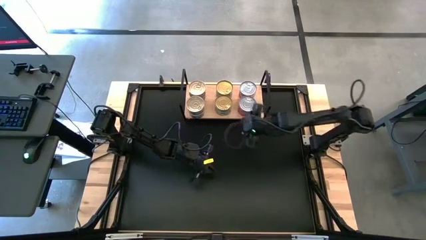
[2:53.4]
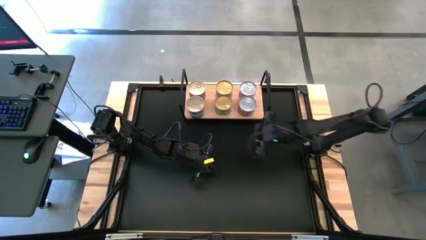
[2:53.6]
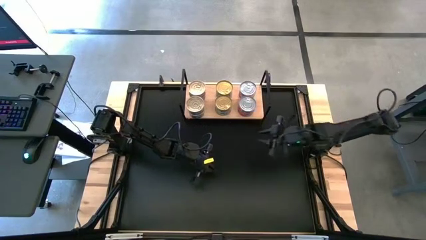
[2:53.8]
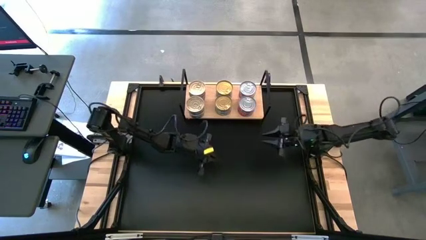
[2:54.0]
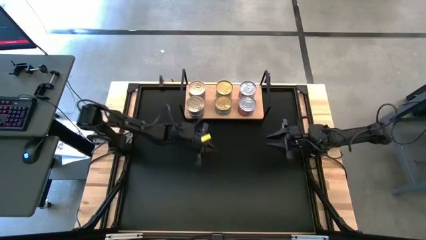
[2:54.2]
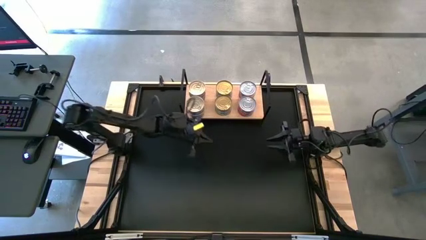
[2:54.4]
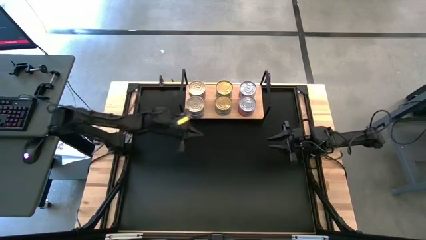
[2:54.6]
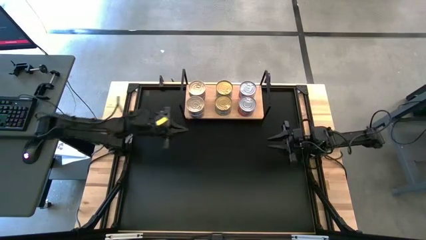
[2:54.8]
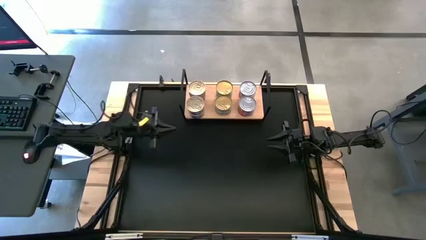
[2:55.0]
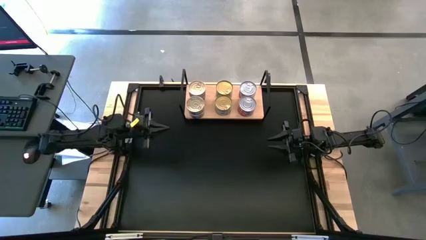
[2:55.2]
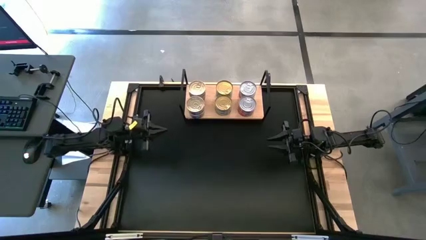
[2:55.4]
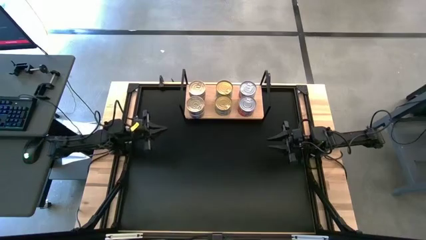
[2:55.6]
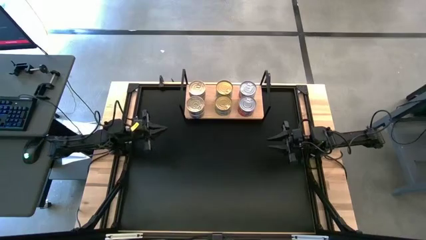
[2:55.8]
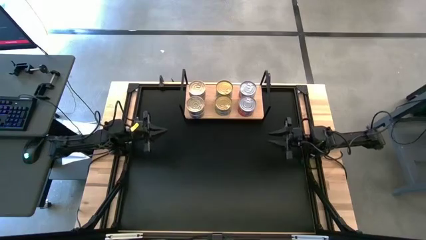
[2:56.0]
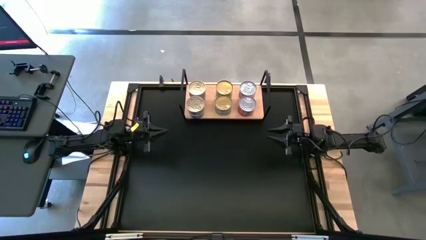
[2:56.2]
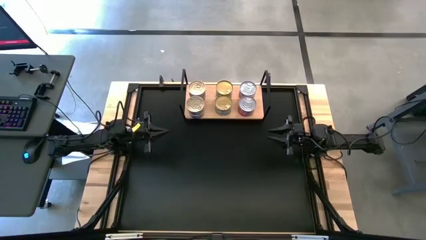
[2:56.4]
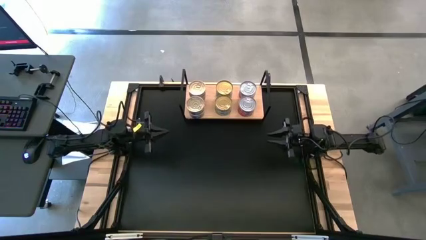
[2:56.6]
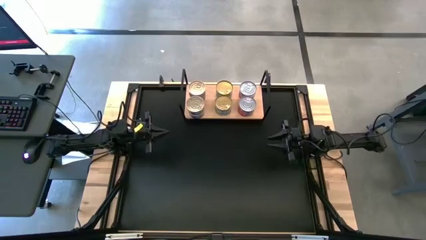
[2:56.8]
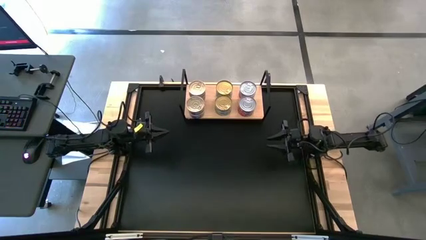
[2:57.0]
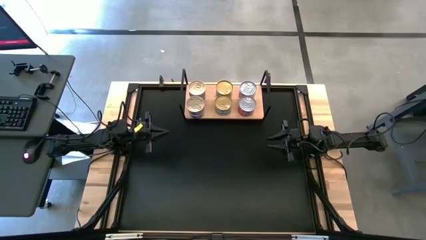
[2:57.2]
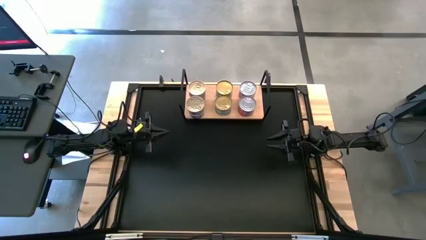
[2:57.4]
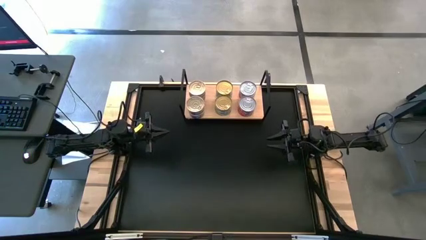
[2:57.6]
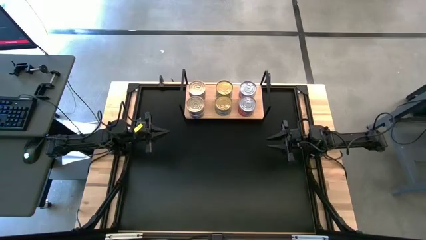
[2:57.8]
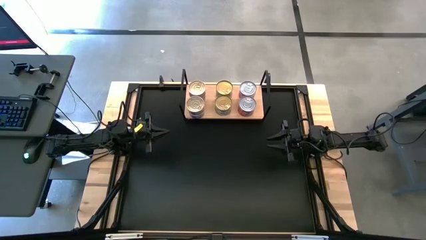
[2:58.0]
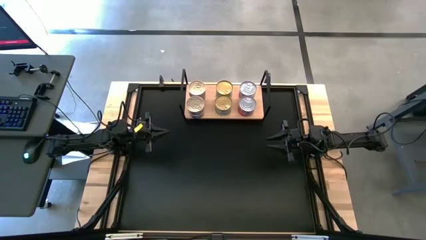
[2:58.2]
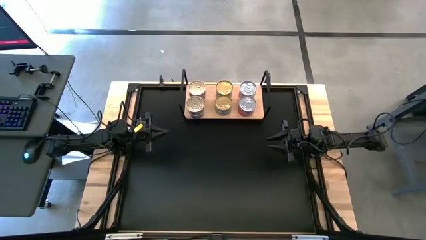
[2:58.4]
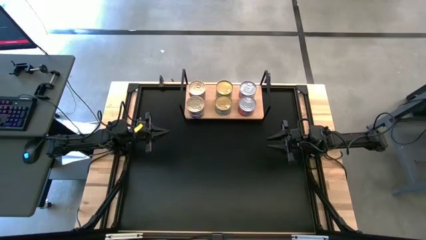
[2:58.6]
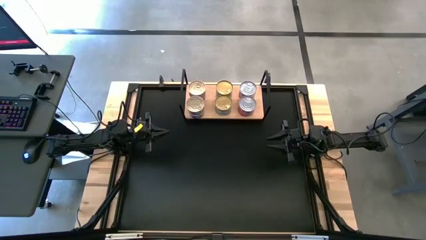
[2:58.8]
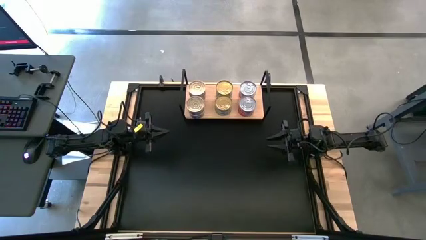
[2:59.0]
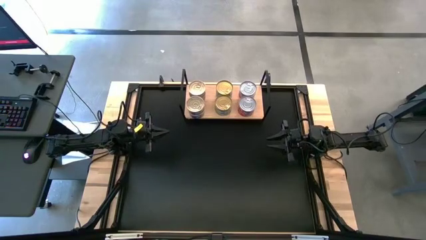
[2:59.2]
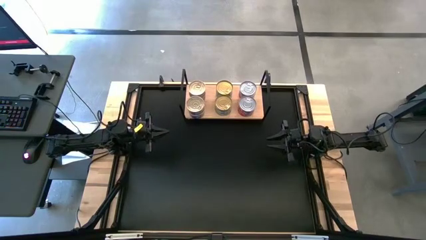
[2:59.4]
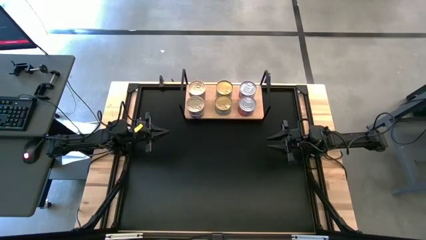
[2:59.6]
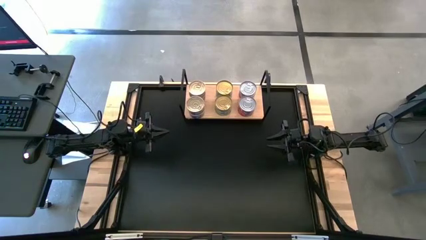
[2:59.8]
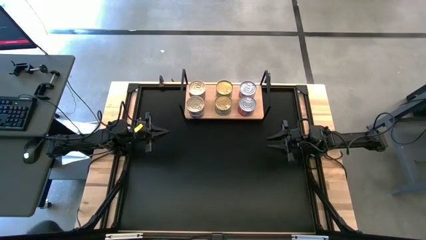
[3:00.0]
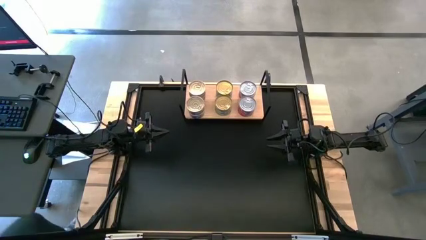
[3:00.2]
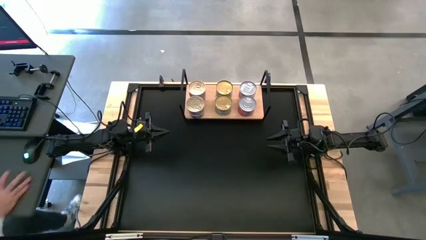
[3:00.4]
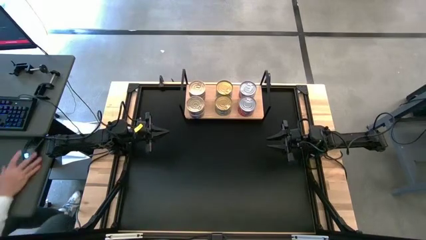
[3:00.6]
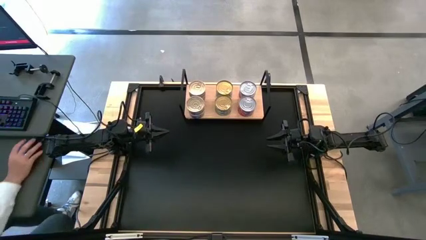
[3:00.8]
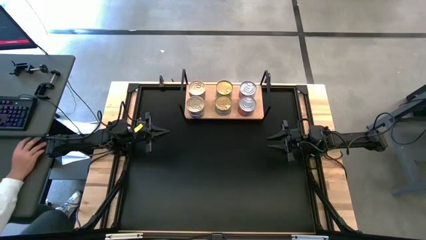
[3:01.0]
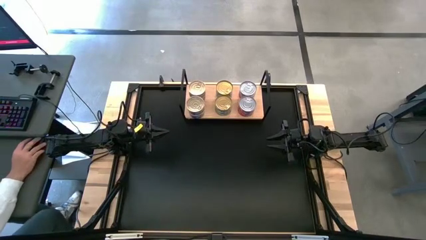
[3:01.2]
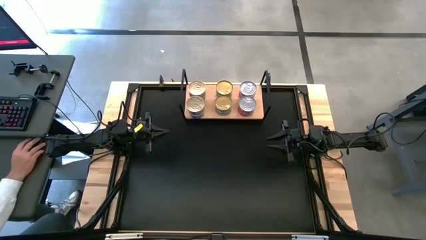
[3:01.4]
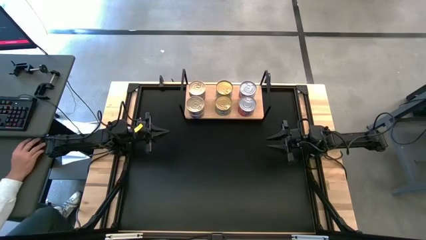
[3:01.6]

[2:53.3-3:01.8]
Task: Stack canned seafood by type on shelf
Return to Home Position

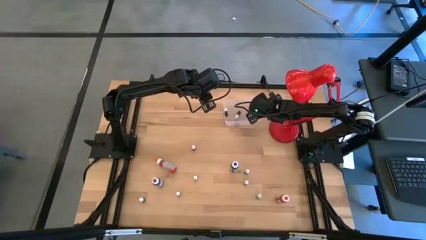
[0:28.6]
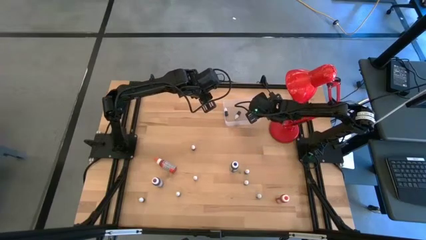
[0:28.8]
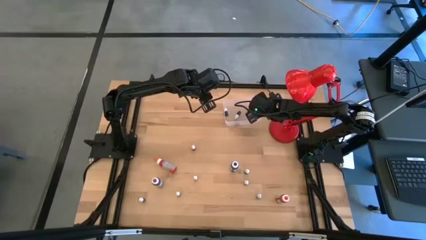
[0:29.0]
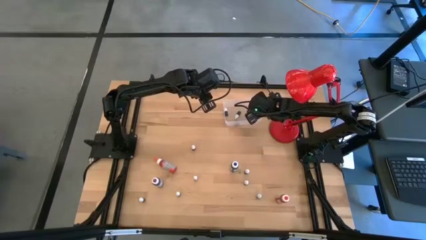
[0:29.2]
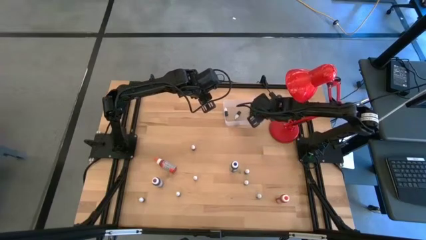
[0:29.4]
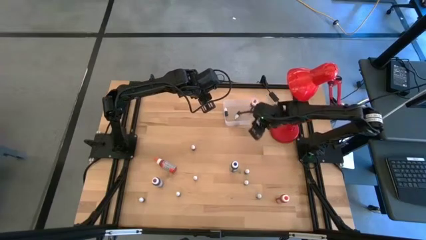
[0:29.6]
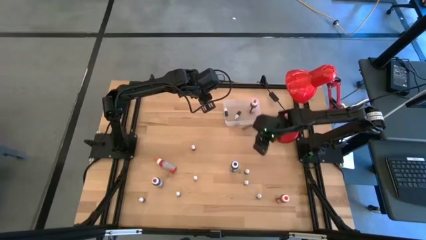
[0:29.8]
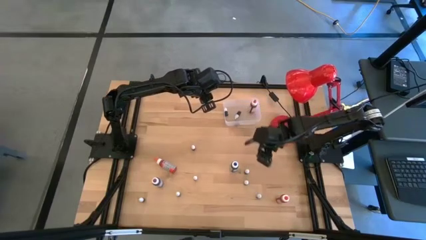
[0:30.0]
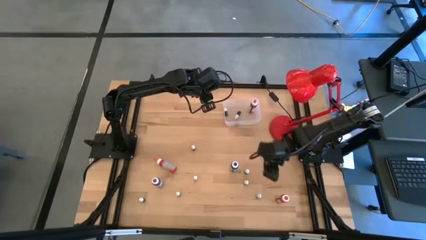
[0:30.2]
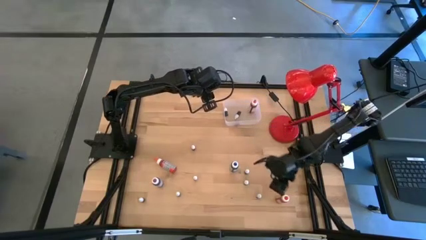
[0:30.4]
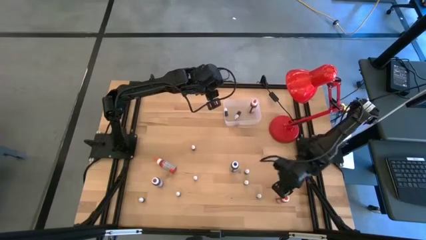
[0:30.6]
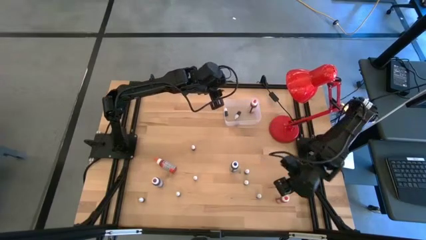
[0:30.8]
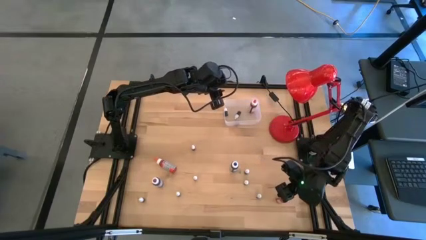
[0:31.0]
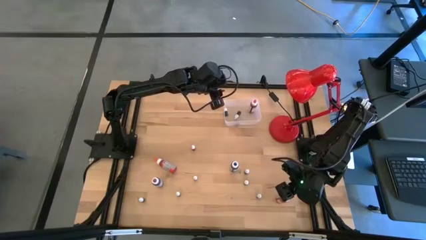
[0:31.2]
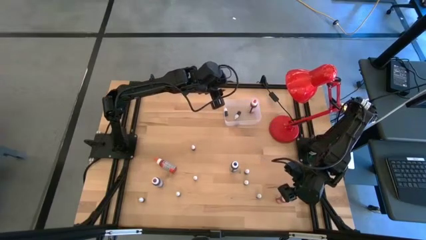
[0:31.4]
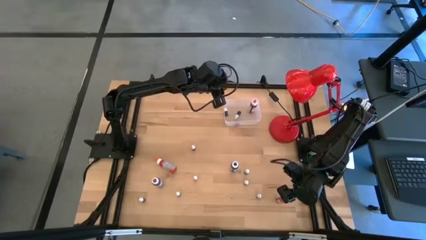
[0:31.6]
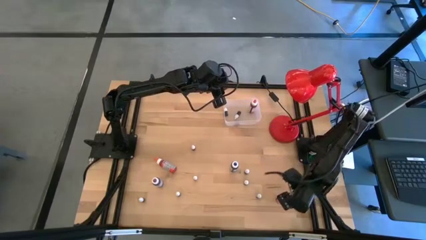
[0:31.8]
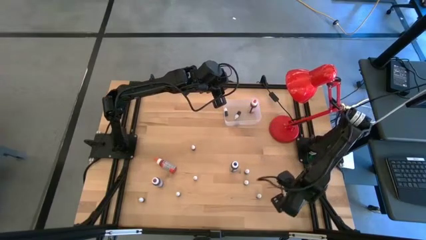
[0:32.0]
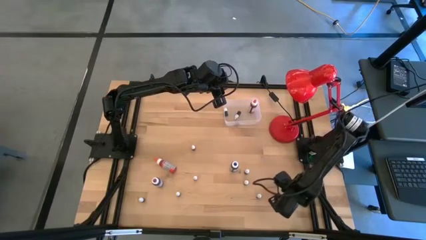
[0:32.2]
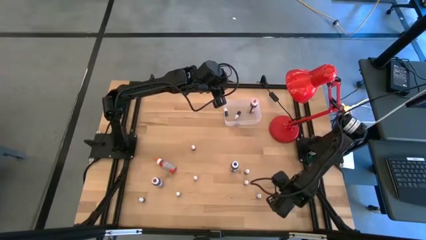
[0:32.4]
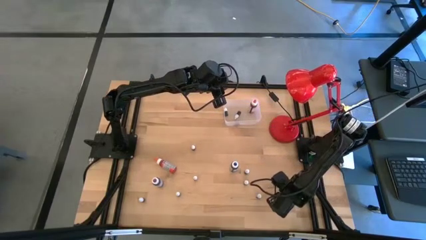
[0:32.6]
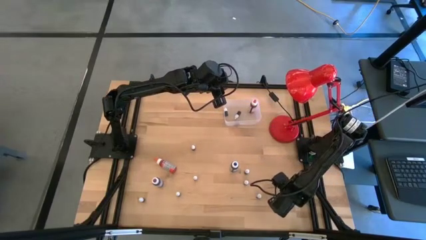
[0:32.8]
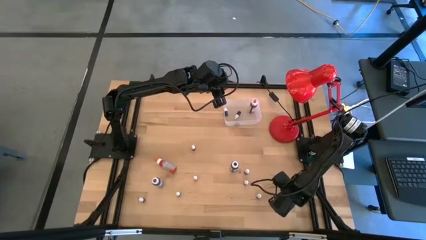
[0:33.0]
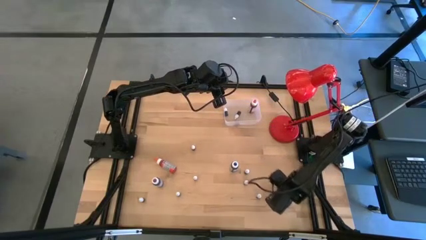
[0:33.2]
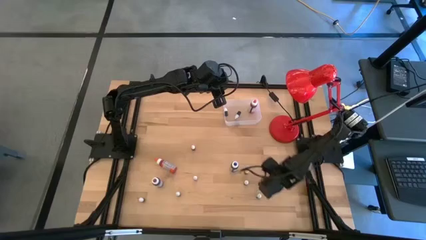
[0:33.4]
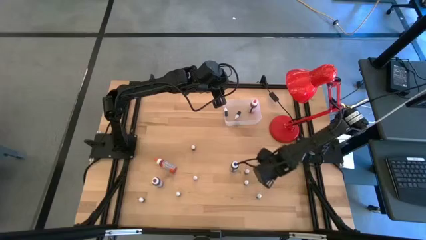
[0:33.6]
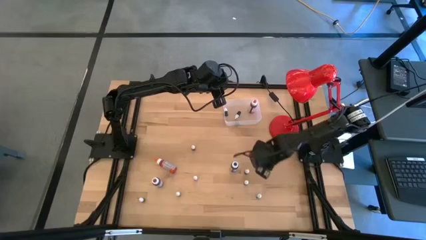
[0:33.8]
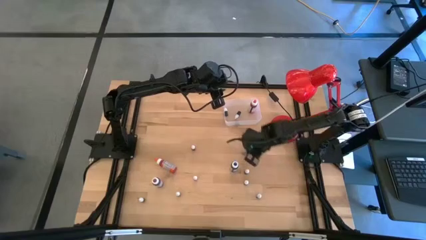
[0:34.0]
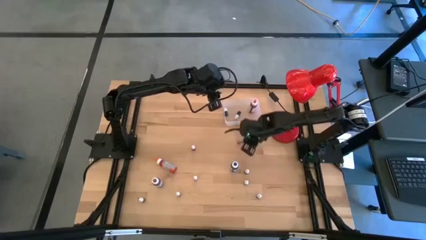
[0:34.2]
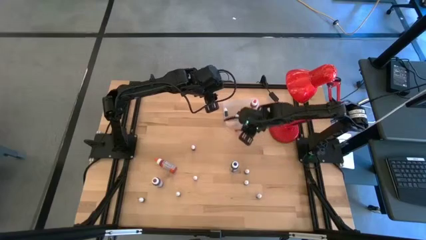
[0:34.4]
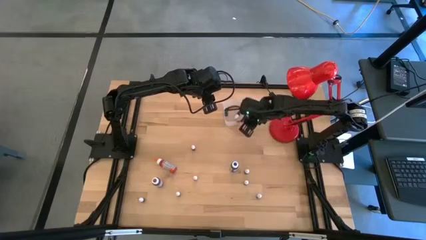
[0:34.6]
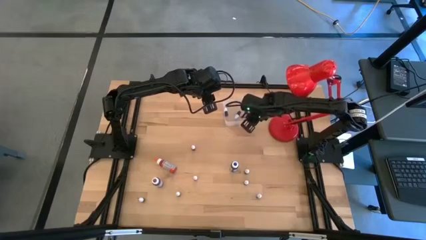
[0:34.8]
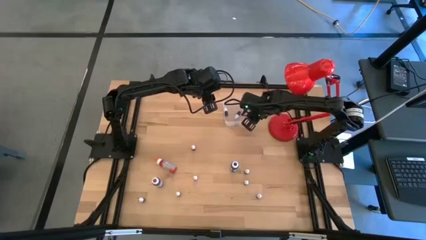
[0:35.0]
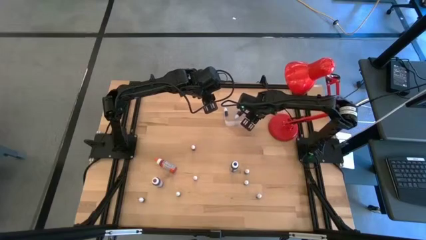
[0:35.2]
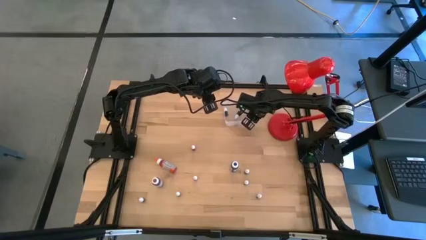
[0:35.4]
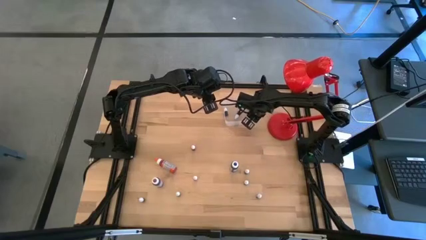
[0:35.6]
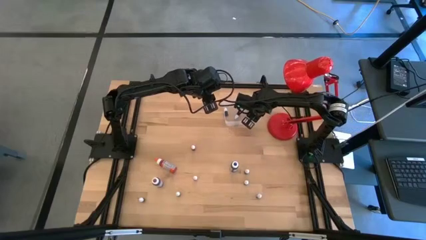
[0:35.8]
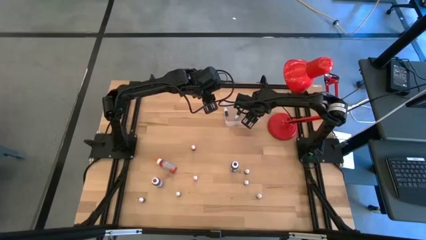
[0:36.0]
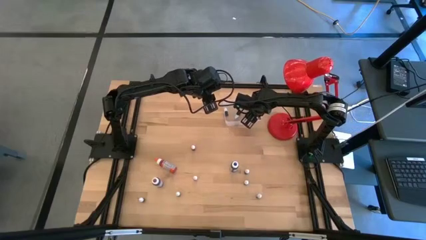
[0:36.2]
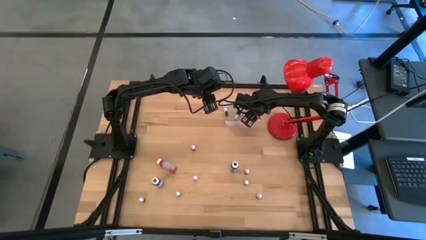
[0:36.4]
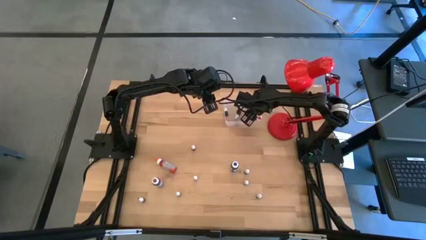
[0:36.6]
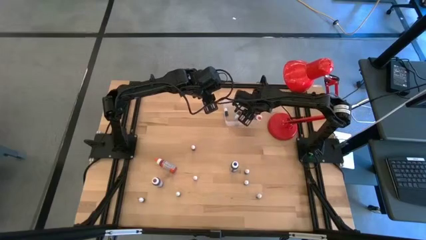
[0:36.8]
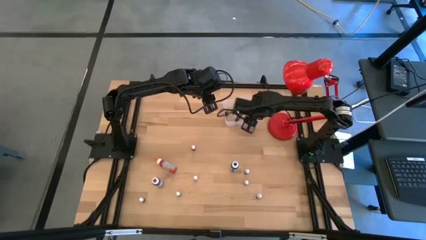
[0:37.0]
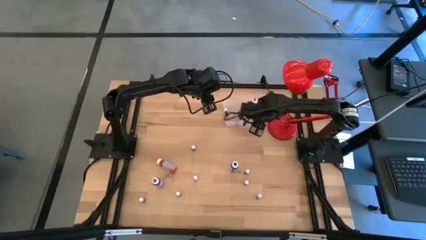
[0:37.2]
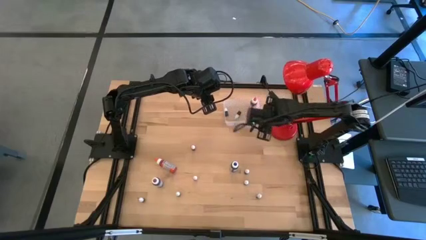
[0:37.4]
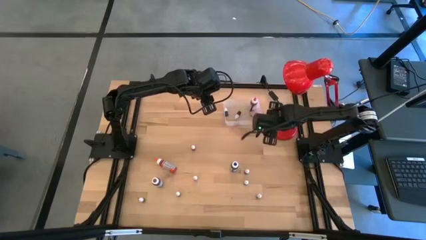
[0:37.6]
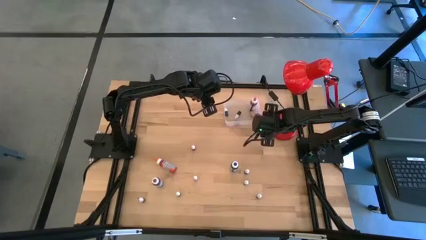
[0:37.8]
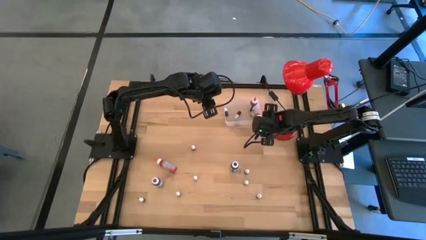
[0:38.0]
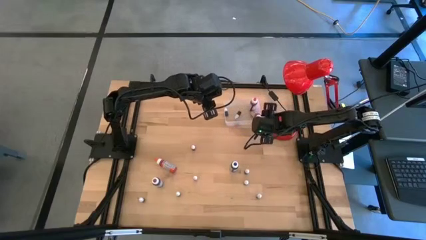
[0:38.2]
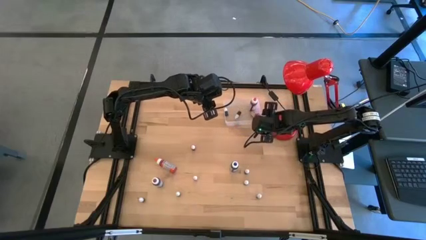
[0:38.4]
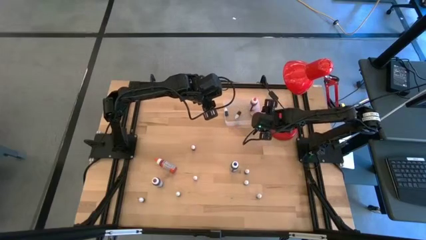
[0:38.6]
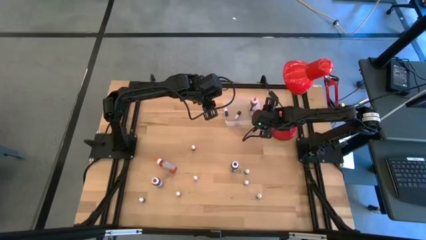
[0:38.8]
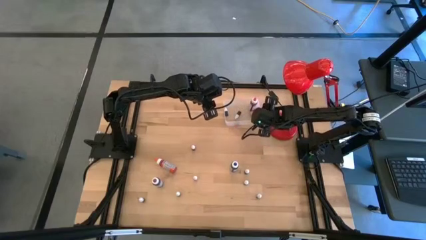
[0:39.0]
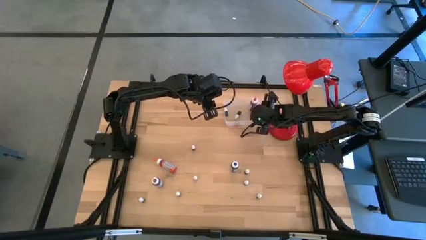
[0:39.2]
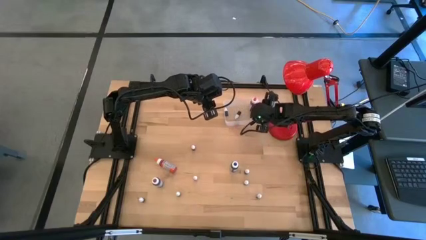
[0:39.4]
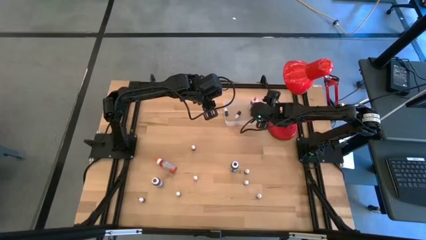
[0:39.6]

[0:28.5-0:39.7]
Task: Pick & Place food coloring
Put the big right orange food coloring bottle in the transparent bin
